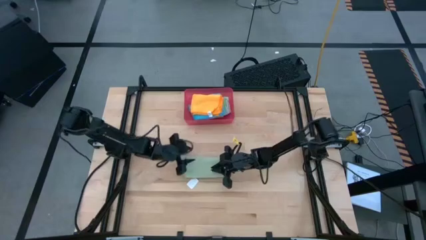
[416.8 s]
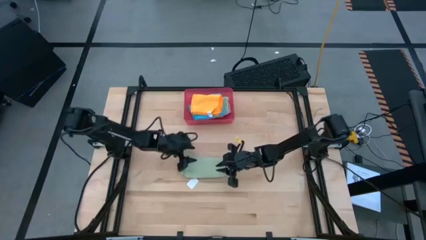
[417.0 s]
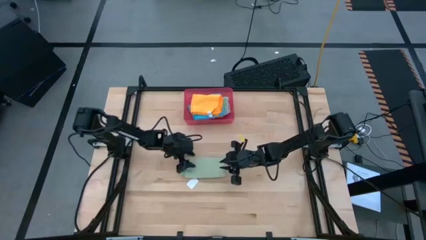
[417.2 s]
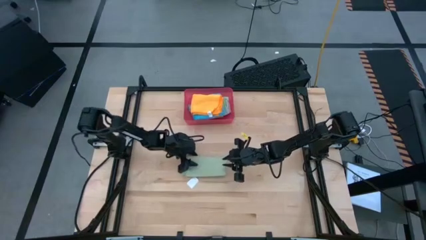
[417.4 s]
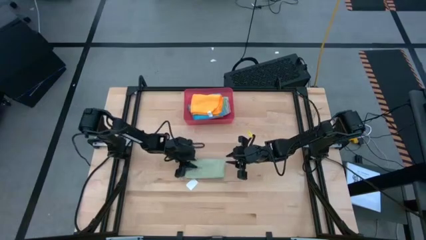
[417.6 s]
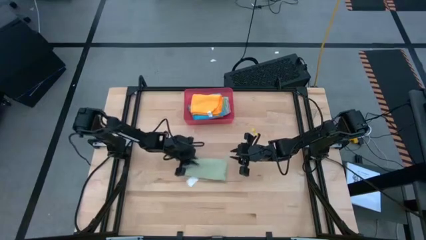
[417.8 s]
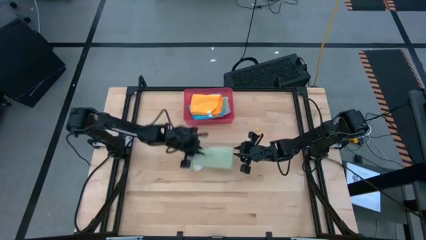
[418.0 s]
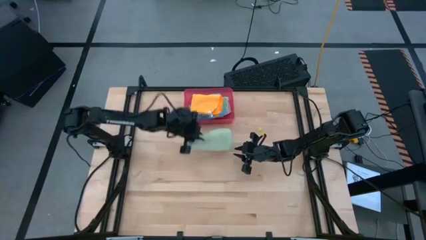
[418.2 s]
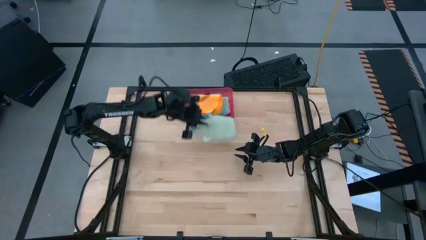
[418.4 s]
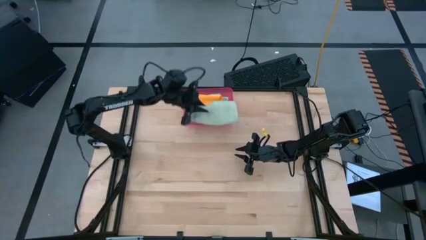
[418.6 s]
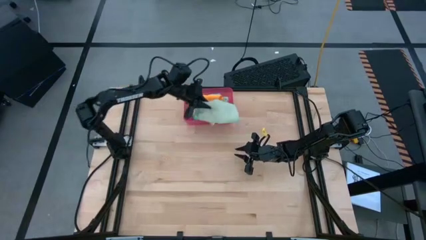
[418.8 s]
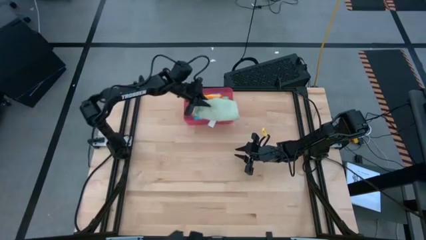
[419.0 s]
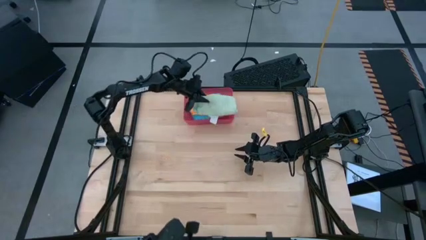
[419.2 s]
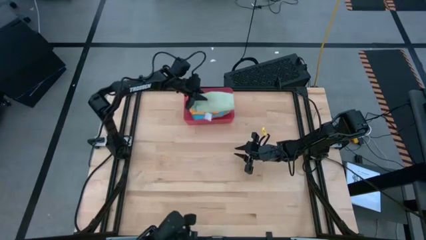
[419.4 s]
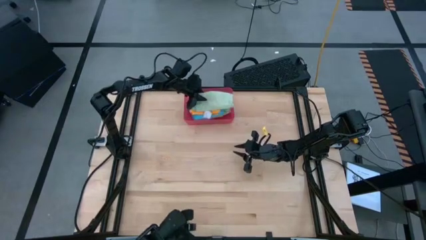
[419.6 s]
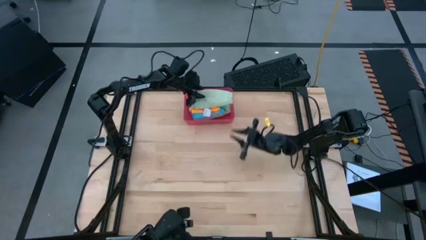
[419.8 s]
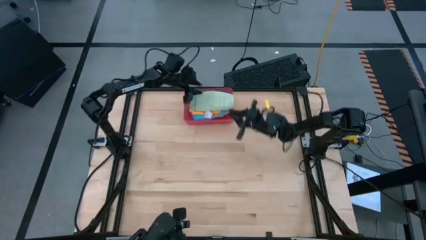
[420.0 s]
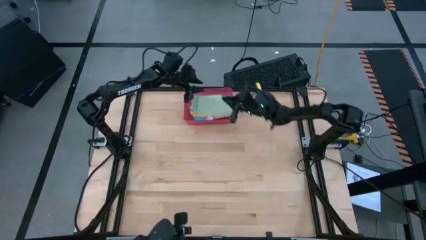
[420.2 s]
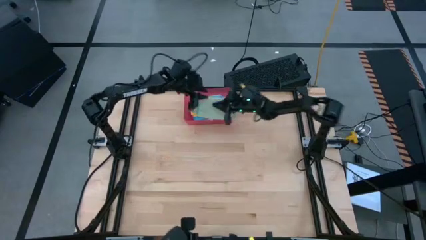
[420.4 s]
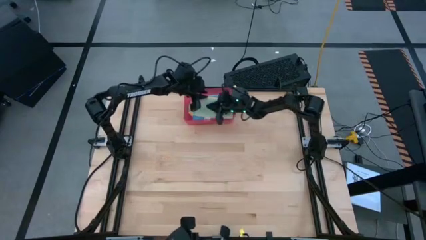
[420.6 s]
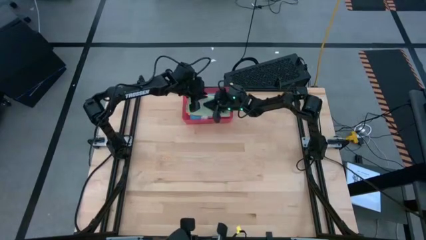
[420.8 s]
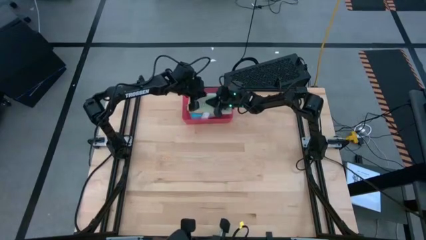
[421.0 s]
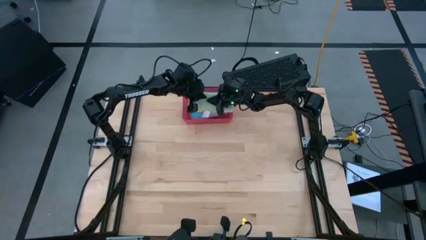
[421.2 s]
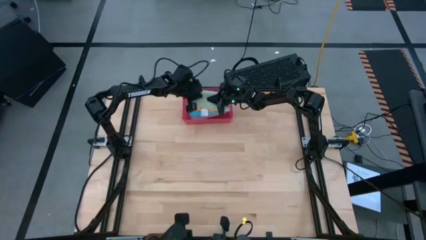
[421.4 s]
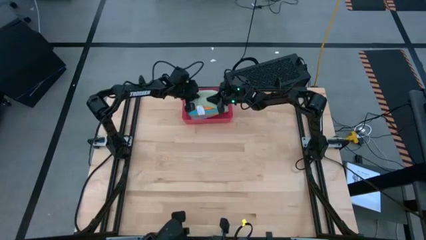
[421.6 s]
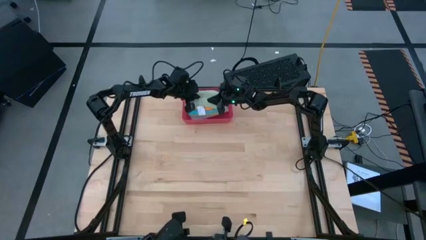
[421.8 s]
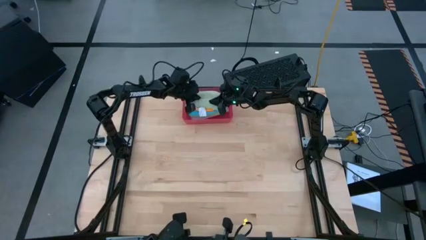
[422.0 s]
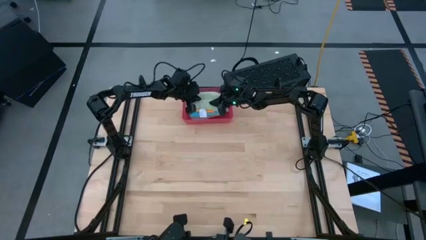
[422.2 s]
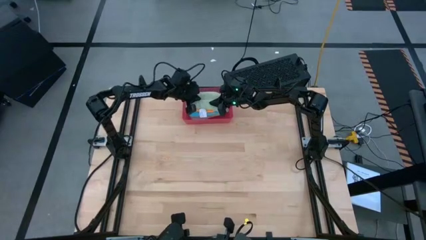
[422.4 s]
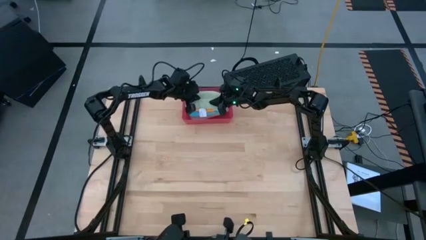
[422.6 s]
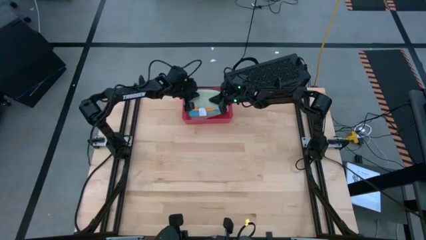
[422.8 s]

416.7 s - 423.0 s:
Task: Fold microfiber towels
Stack the folded light green towel on top of the folded yellow towel in the red bin

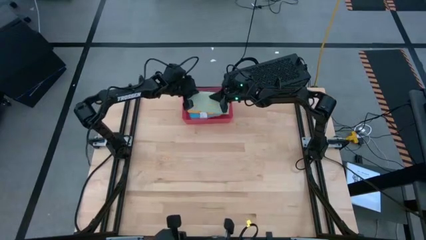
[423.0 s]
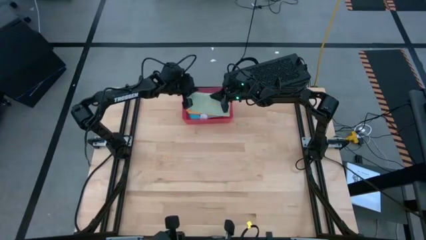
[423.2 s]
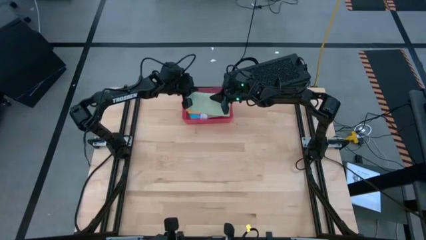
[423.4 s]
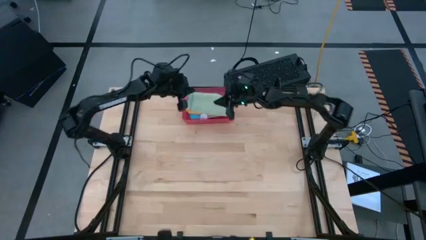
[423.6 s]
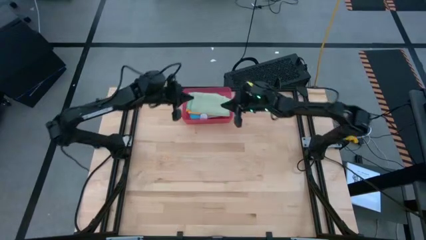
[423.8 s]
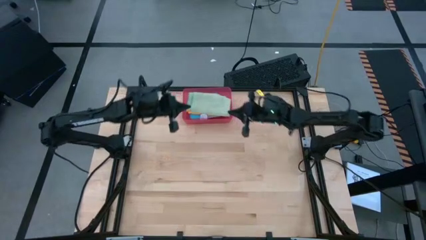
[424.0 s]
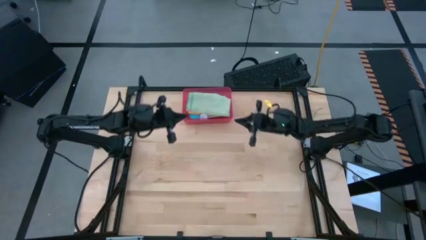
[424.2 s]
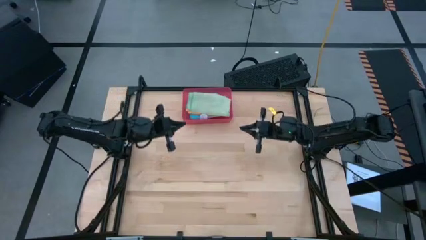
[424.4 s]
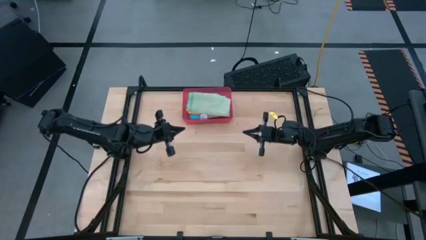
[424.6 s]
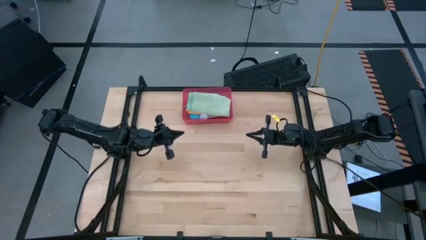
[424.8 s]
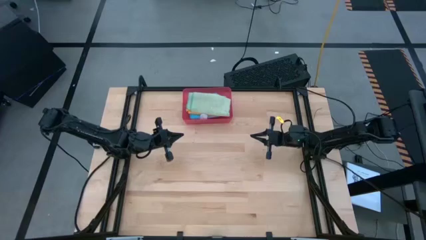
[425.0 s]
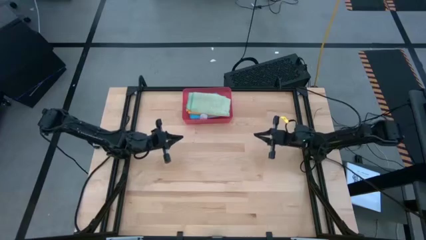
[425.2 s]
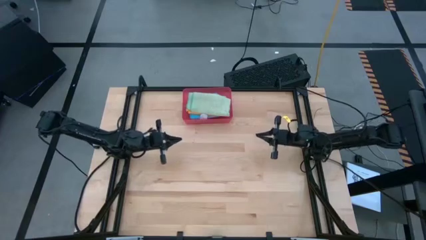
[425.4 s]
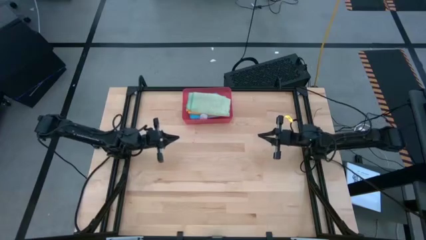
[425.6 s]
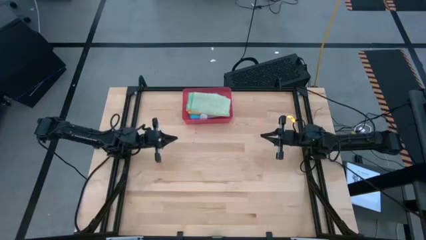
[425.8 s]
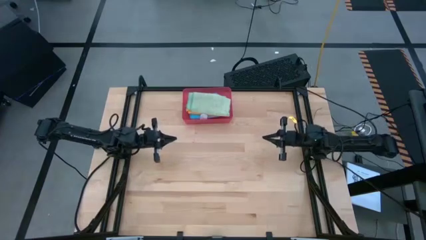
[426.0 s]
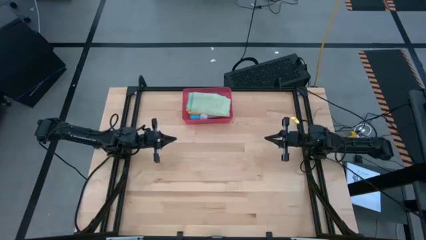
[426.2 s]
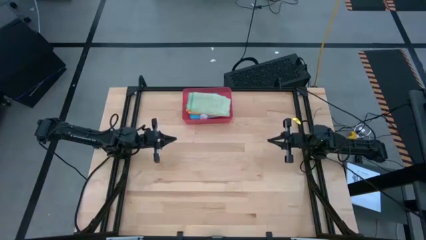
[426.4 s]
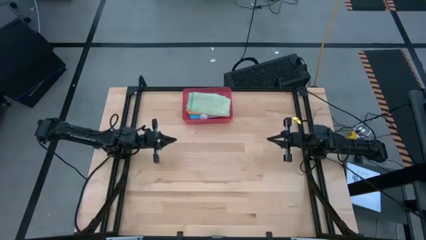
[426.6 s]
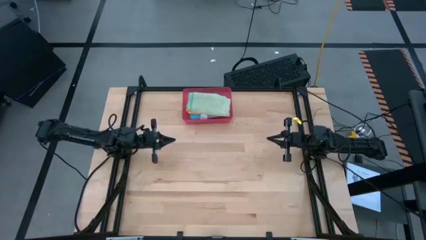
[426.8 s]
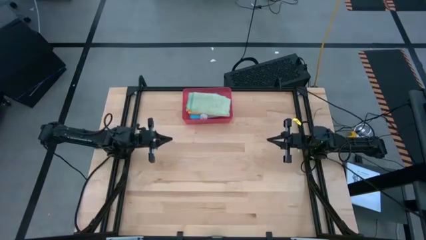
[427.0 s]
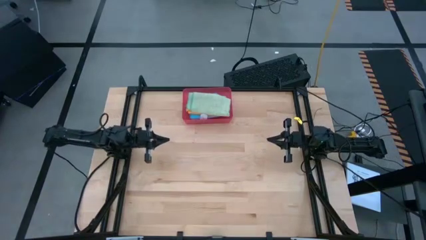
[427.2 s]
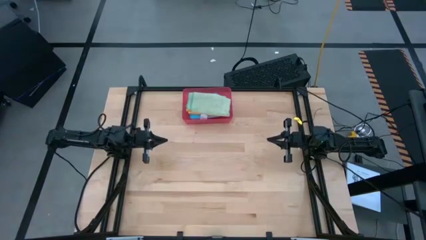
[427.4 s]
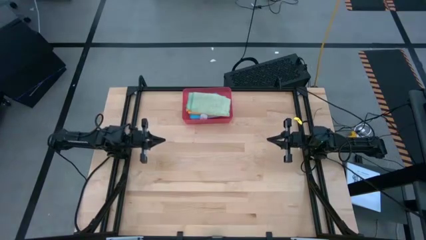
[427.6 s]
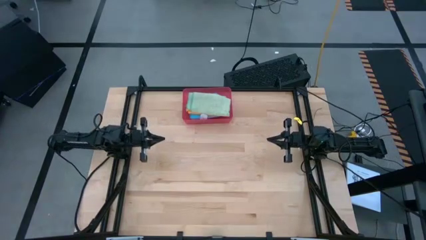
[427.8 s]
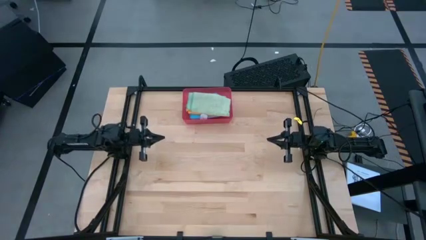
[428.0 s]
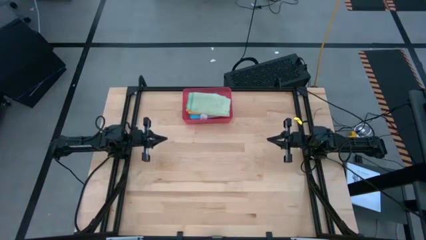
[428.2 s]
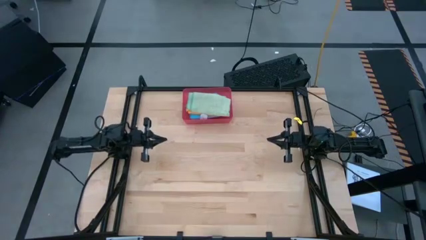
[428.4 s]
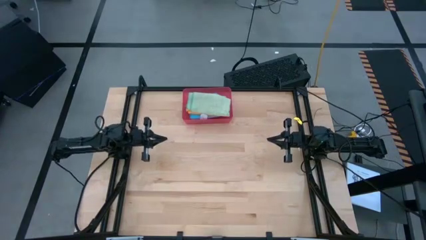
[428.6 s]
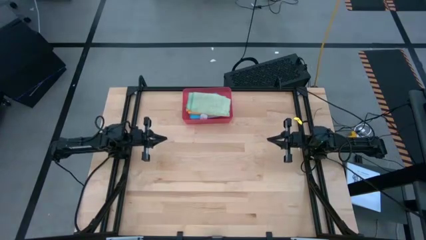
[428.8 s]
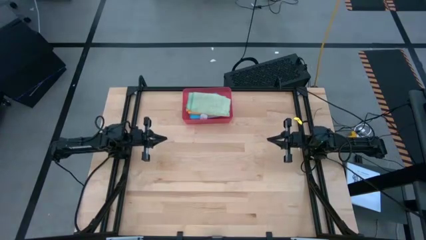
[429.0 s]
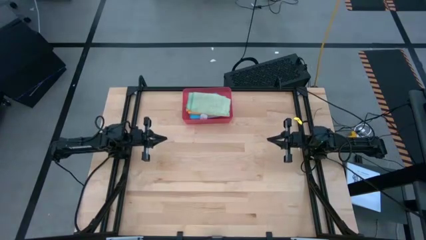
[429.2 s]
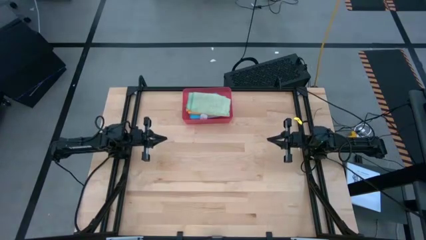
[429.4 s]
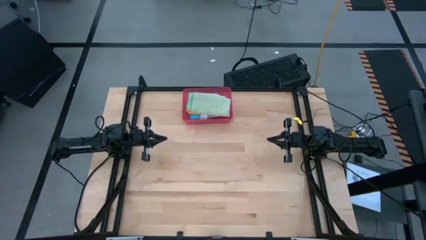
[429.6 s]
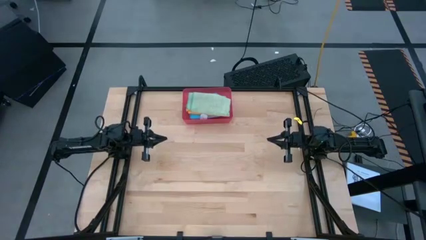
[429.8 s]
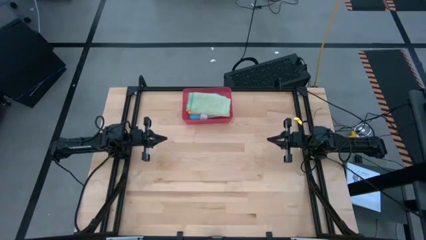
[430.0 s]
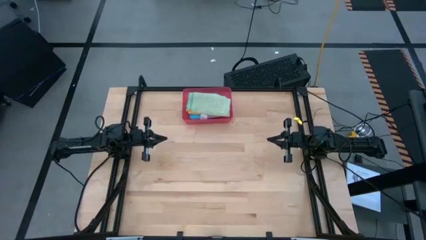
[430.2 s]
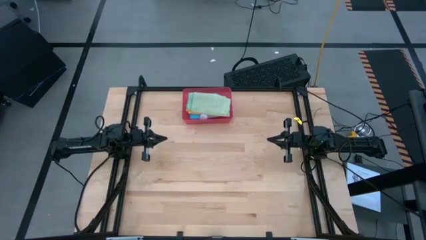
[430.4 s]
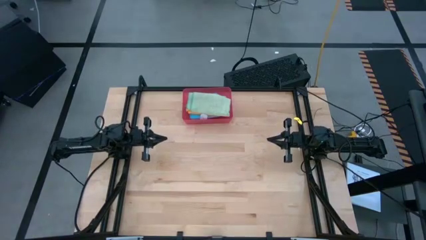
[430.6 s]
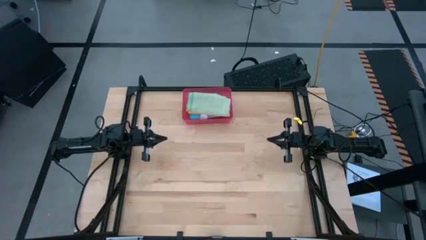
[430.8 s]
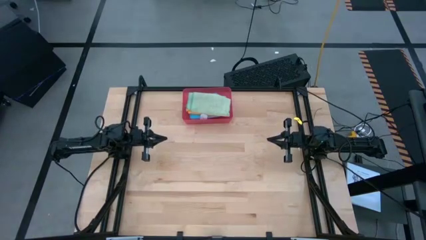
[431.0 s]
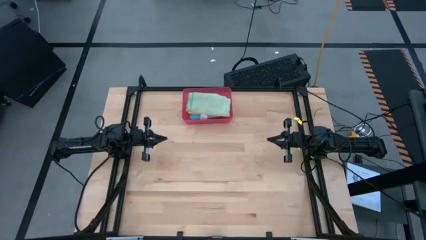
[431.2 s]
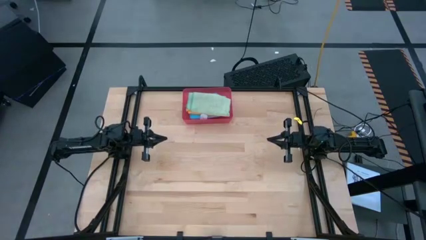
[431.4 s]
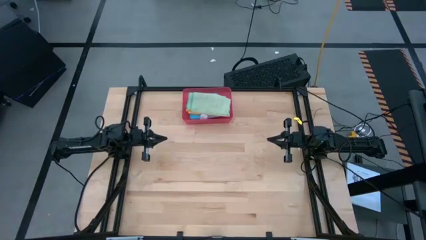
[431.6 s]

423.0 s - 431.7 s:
Return to Home Position
